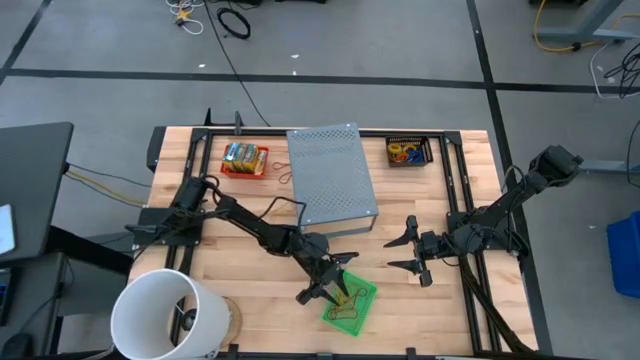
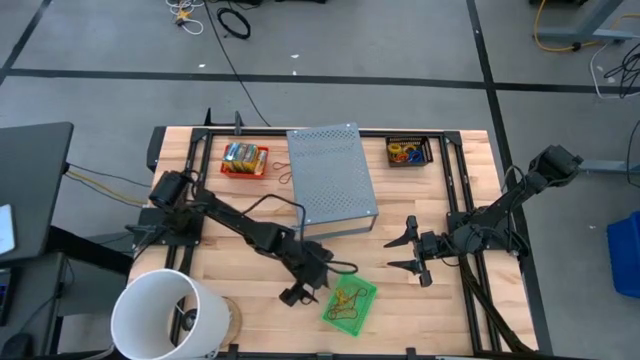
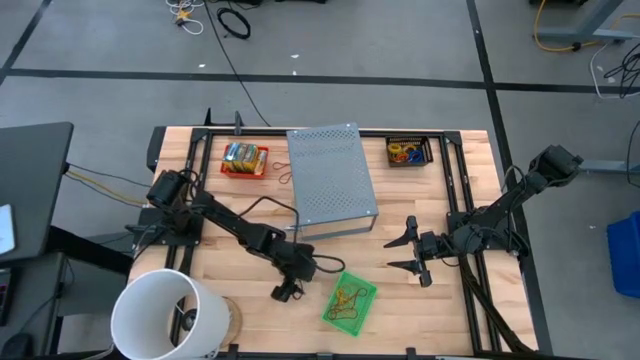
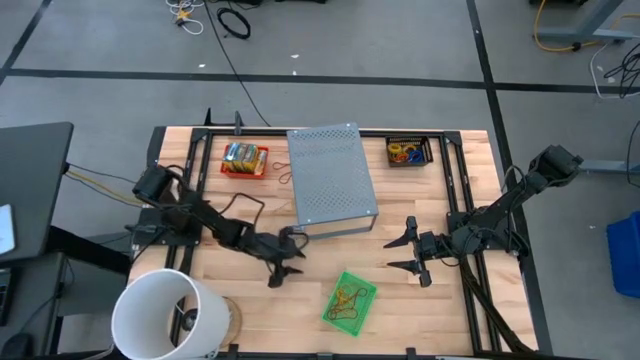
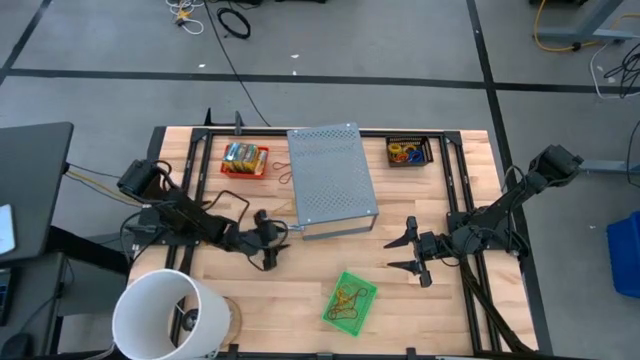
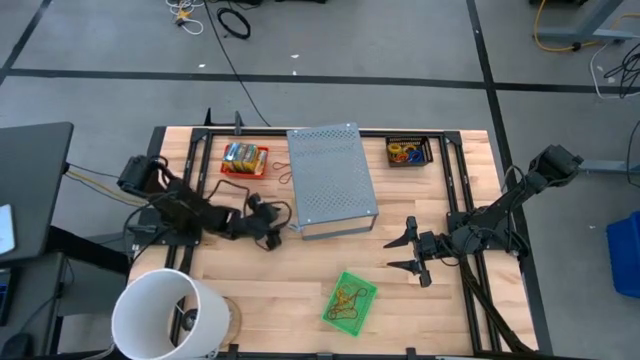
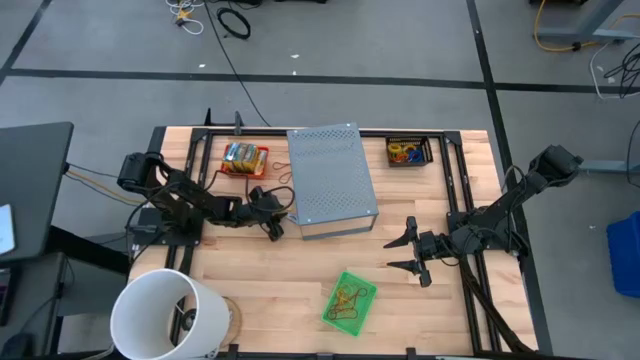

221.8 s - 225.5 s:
Task: Pick & Place Office Desk Supplies
Put the yellow rubber band into the green basket

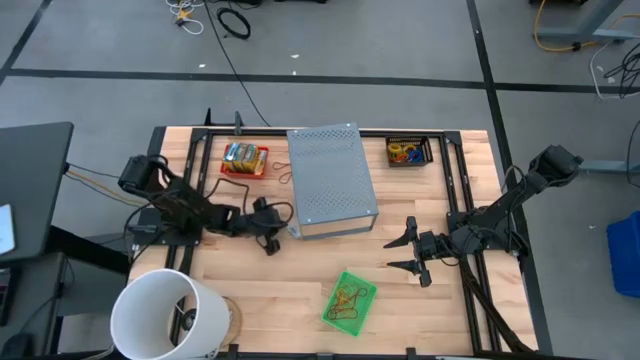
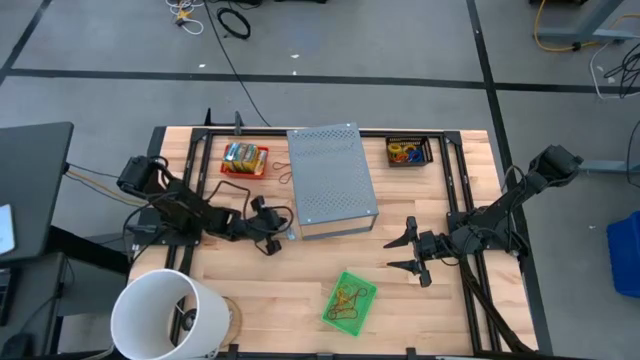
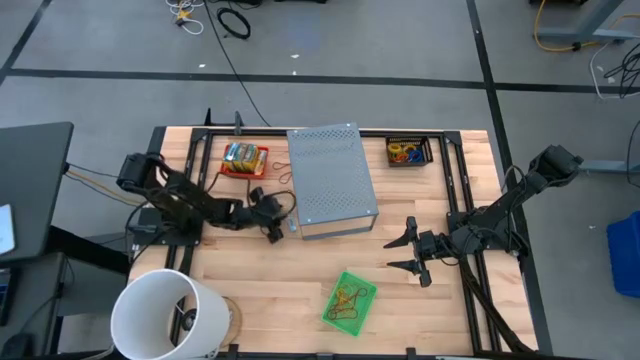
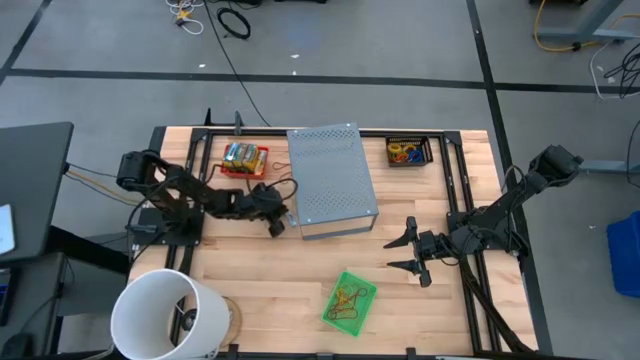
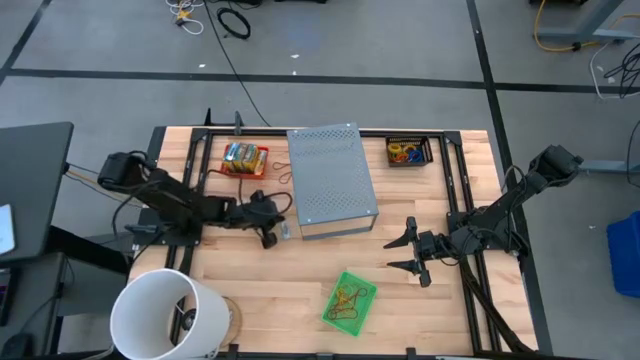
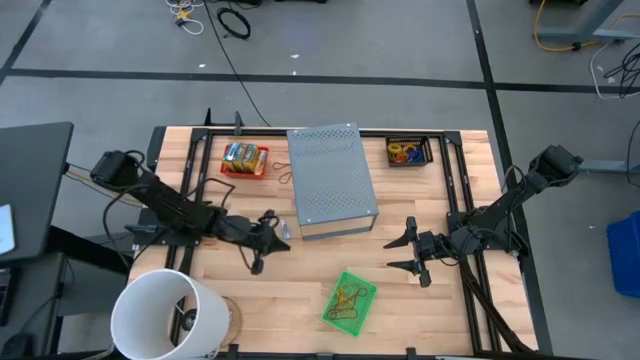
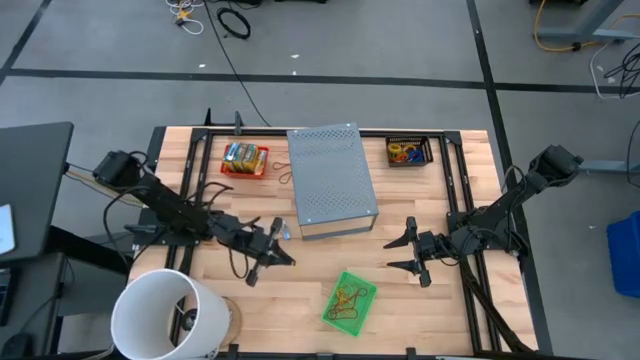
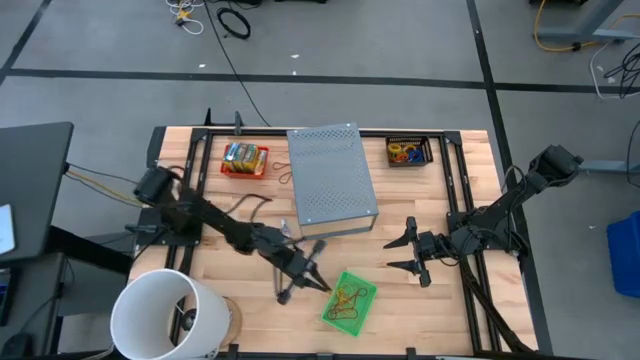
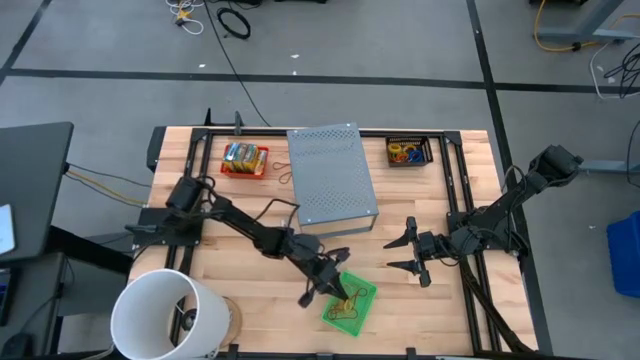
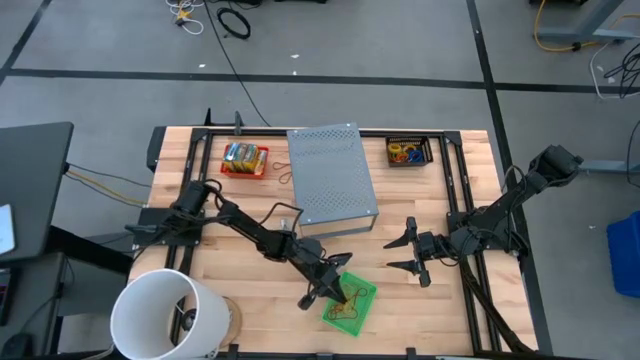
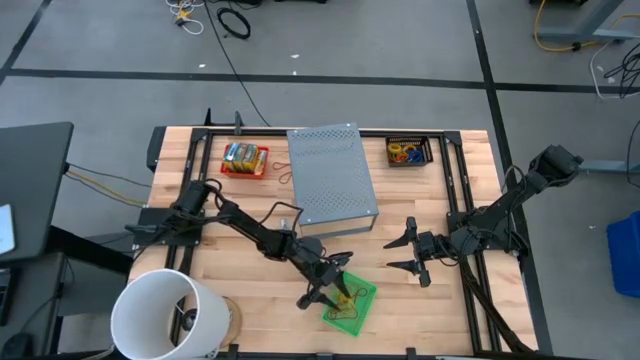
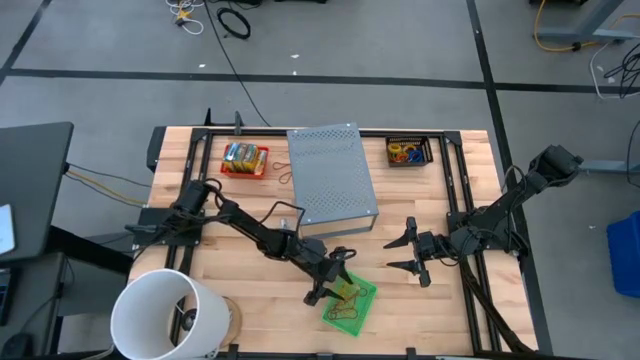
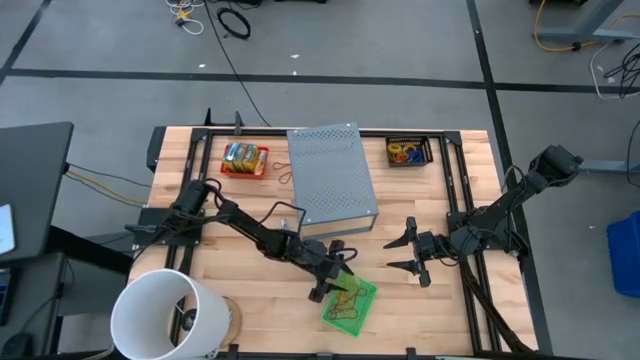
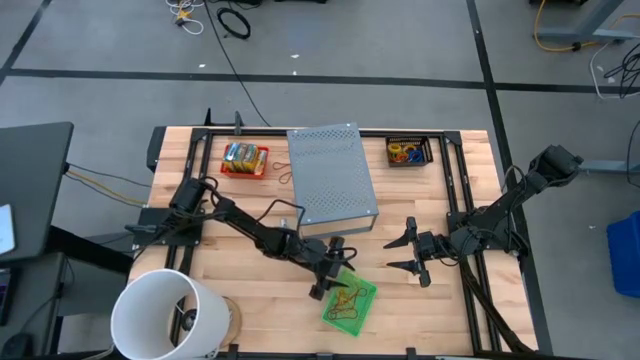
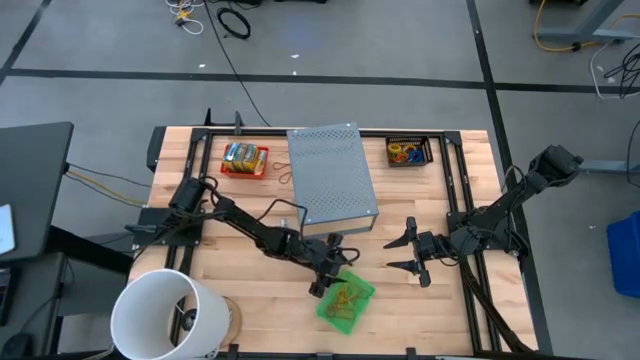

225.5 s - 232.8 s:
Put the yellow rubber band into the green basket

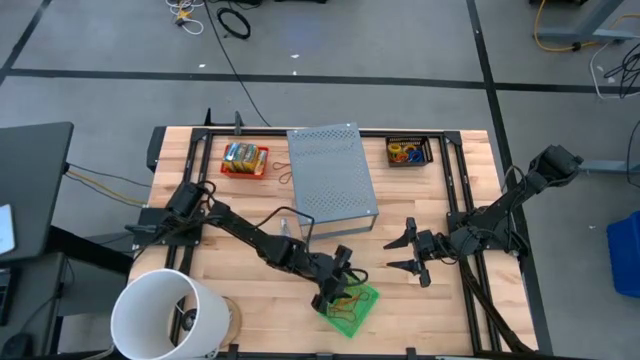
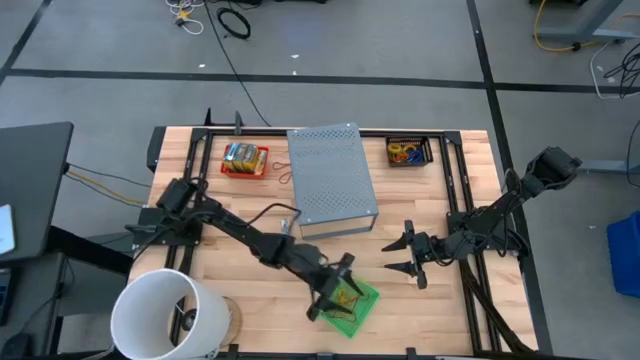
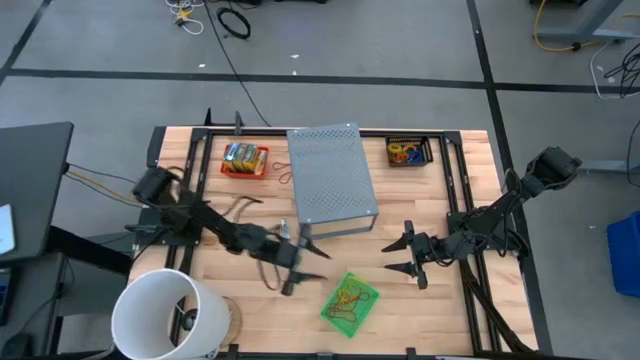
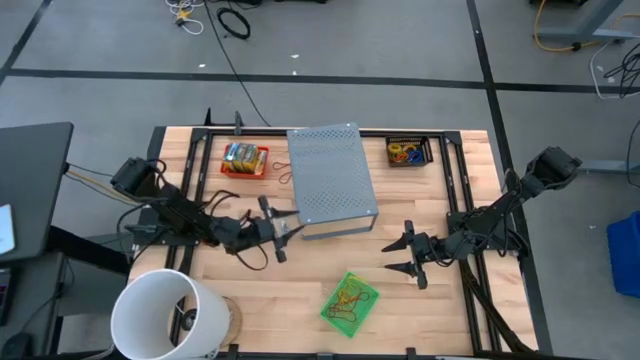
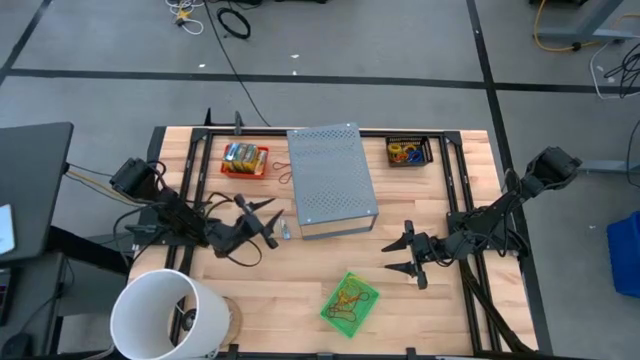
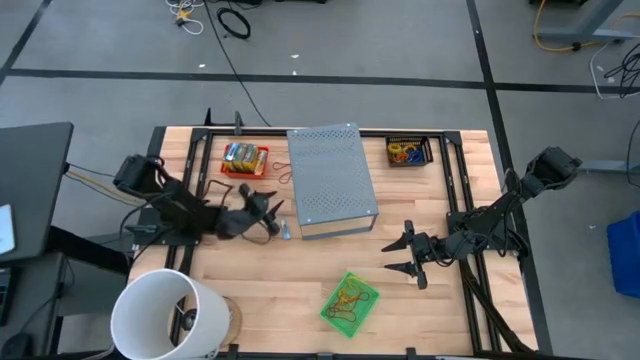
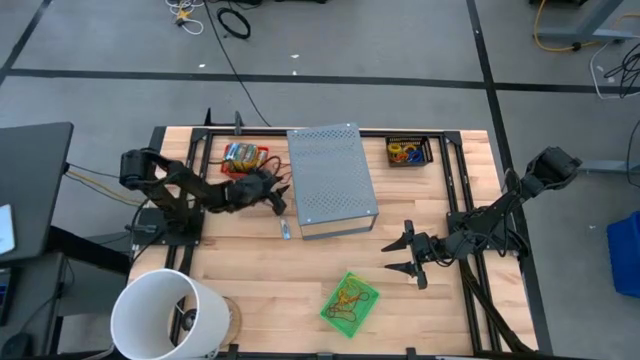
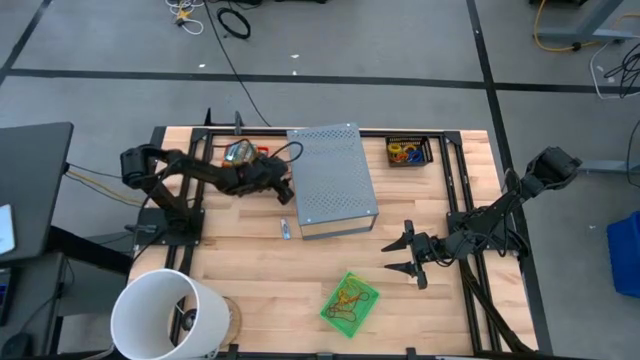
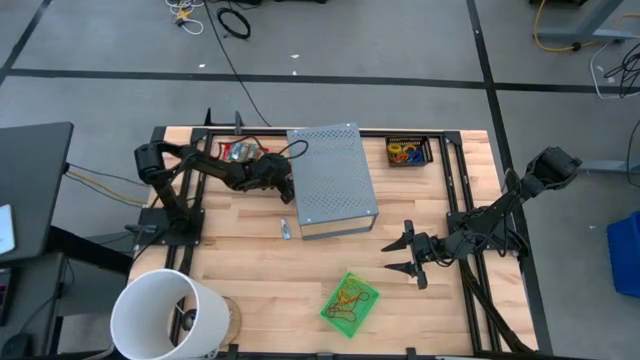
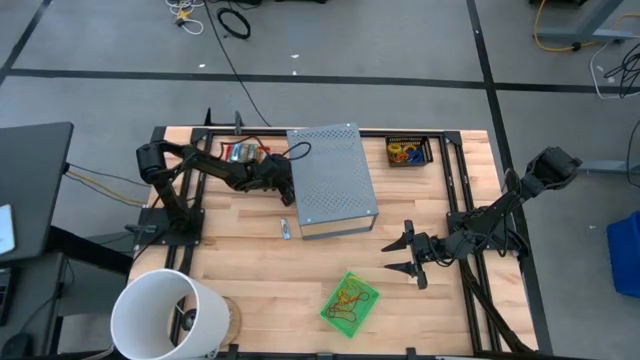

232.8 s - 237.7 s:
Put the red rubber band into the green basket

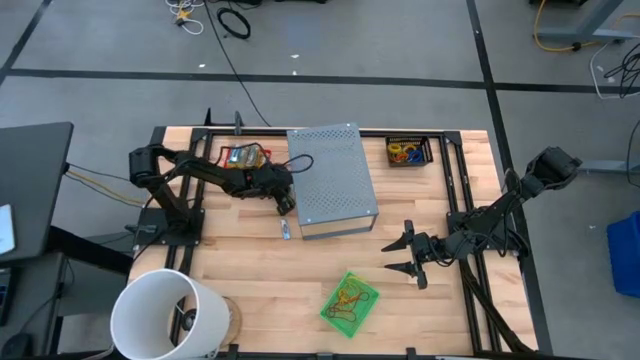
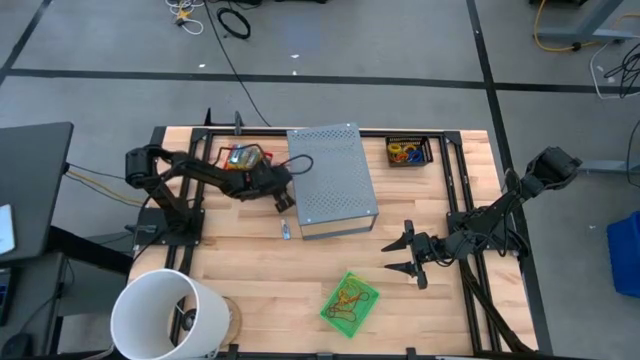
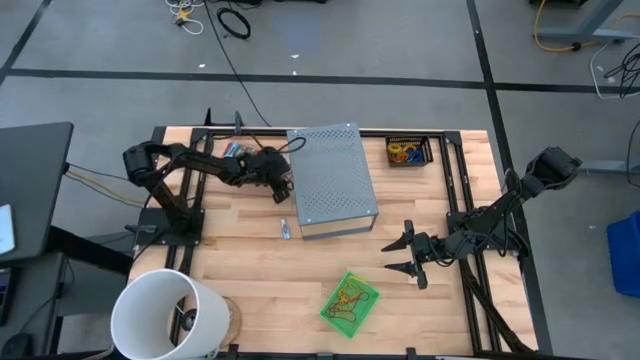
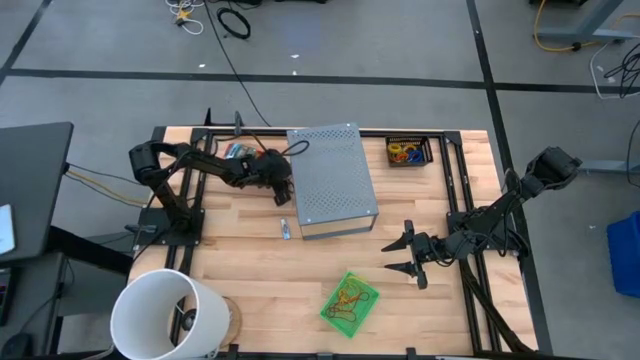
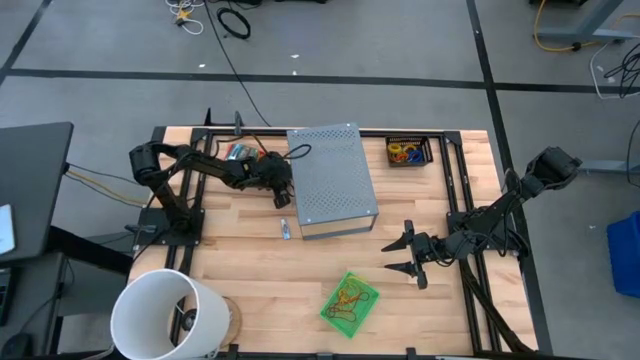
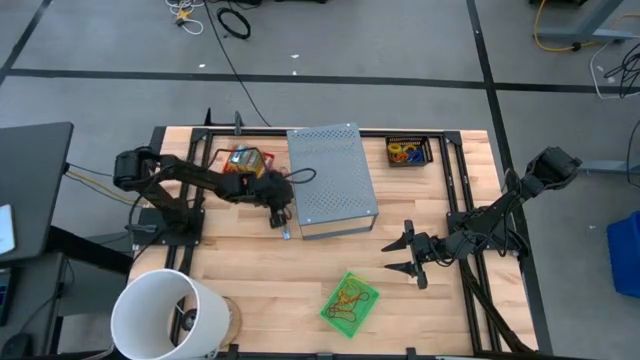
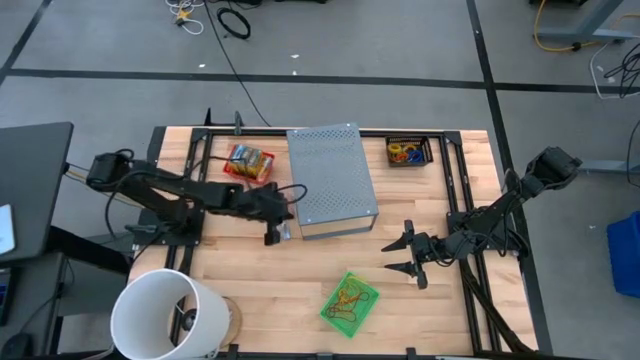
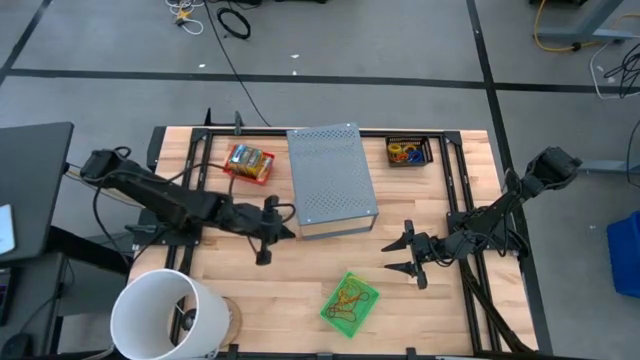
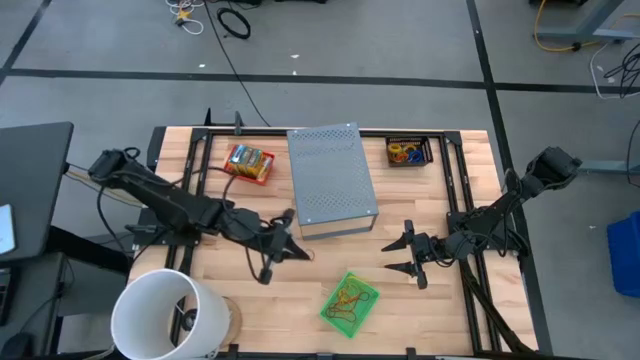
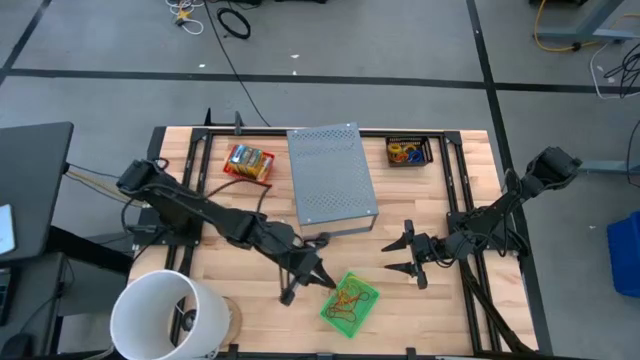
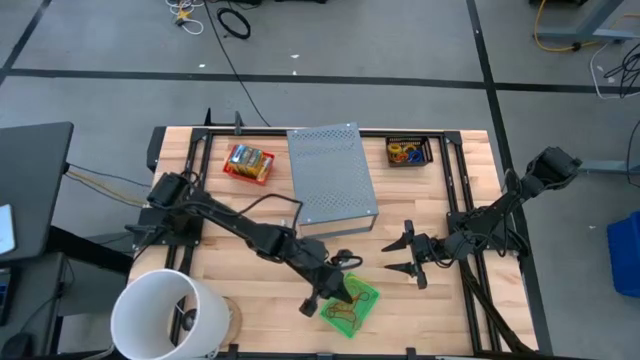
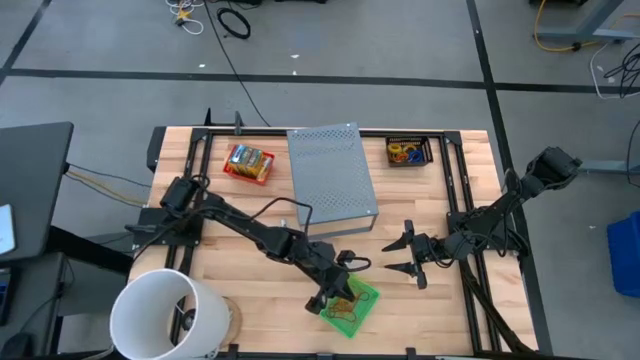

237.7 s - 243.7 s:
Put the red rubber band into the green basket
